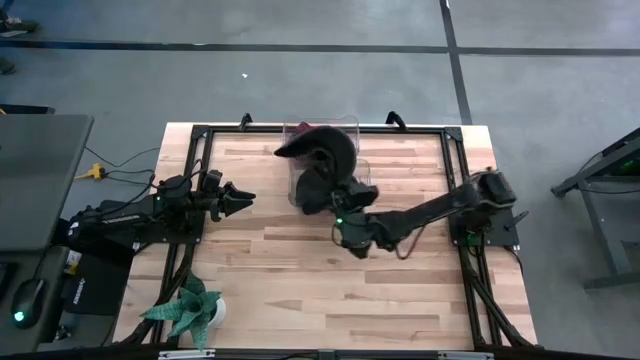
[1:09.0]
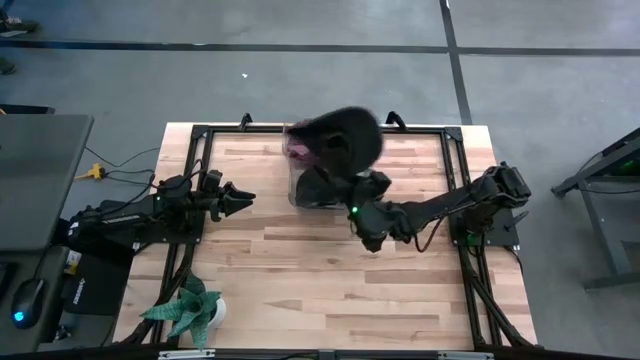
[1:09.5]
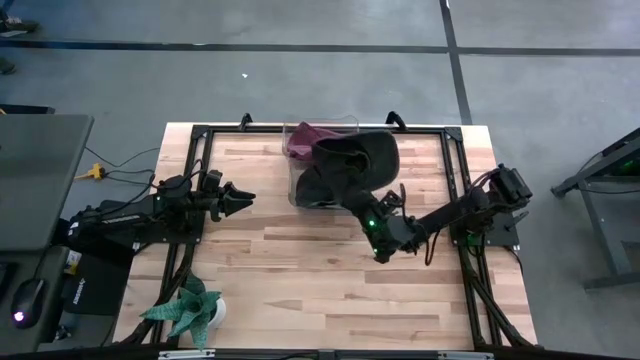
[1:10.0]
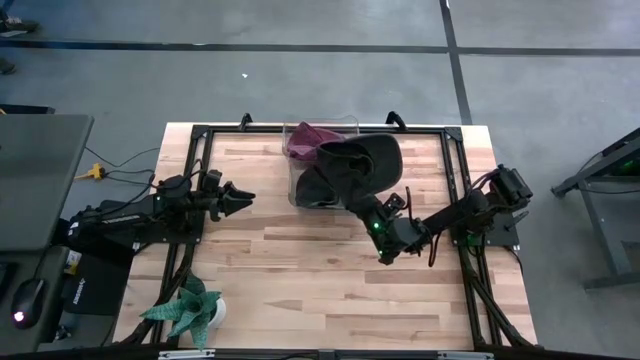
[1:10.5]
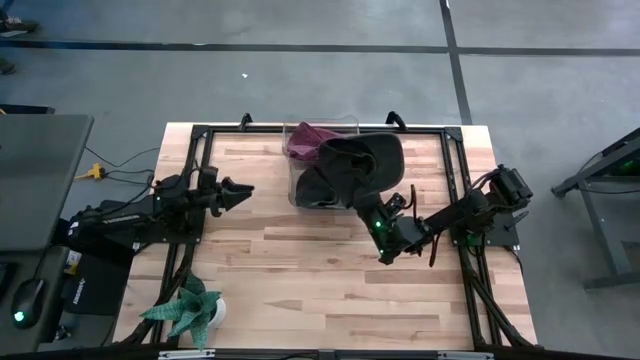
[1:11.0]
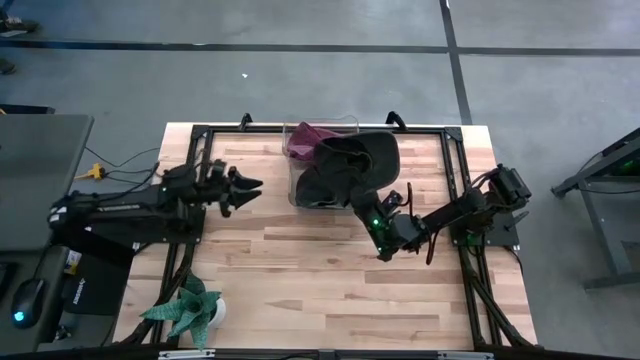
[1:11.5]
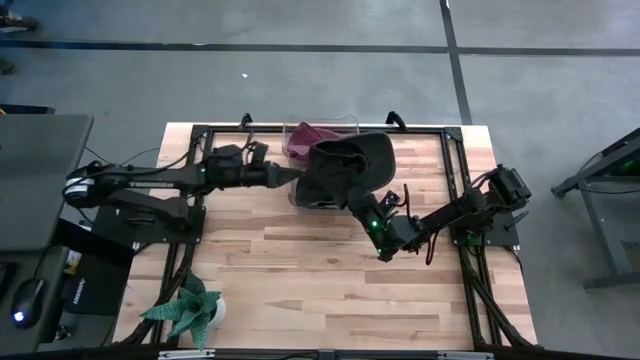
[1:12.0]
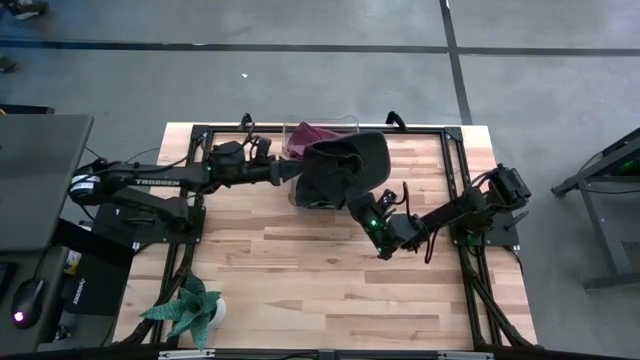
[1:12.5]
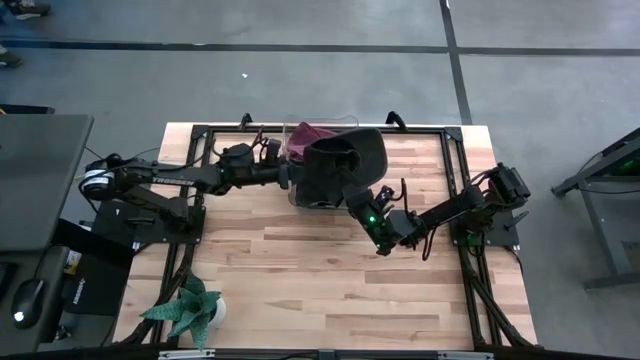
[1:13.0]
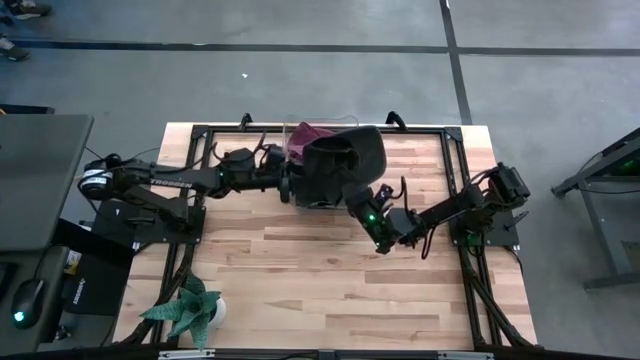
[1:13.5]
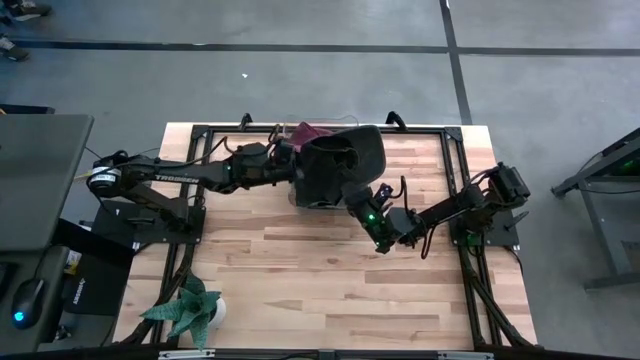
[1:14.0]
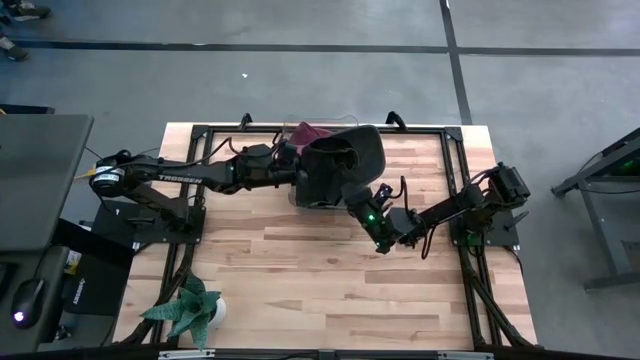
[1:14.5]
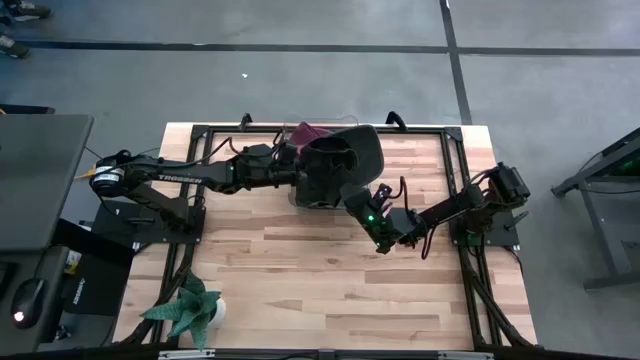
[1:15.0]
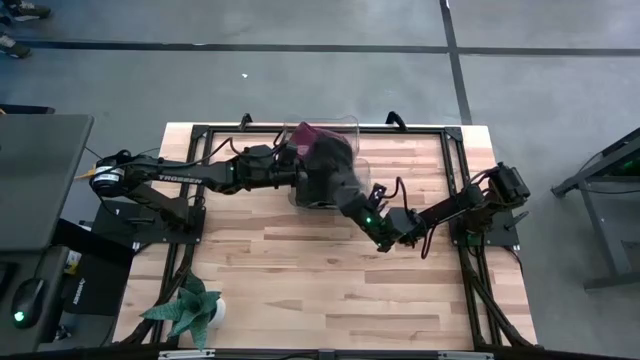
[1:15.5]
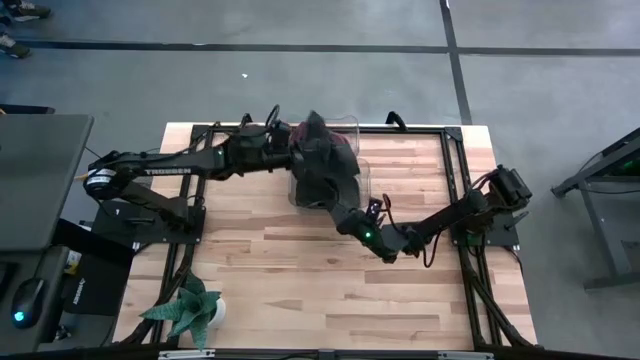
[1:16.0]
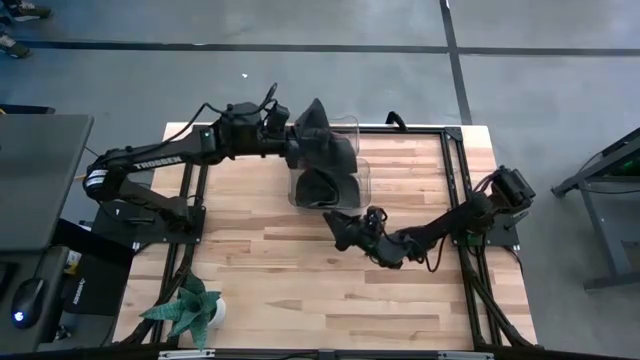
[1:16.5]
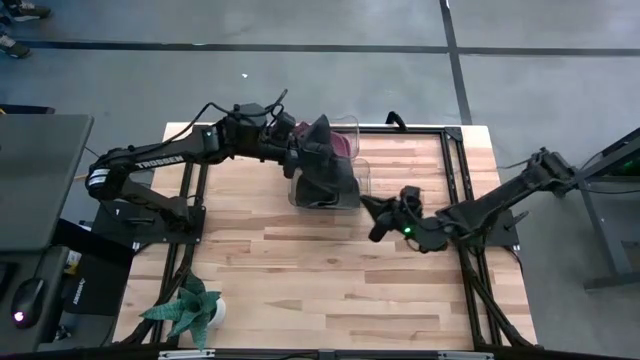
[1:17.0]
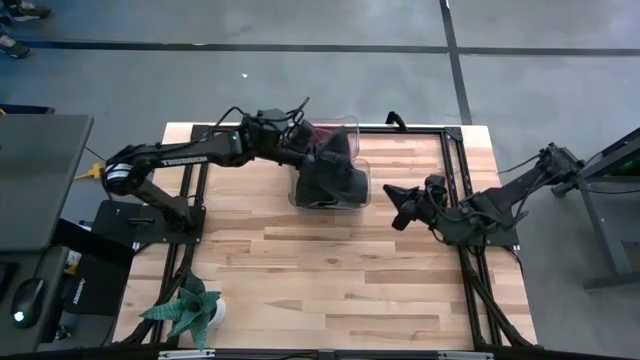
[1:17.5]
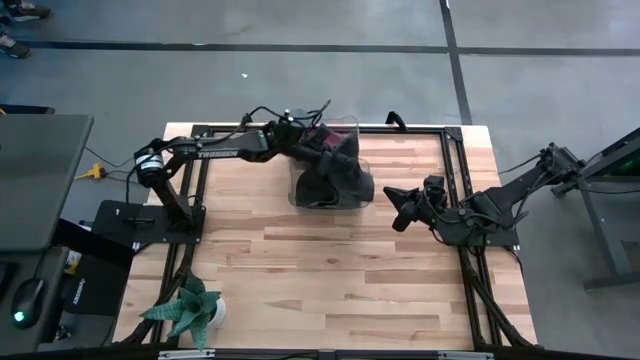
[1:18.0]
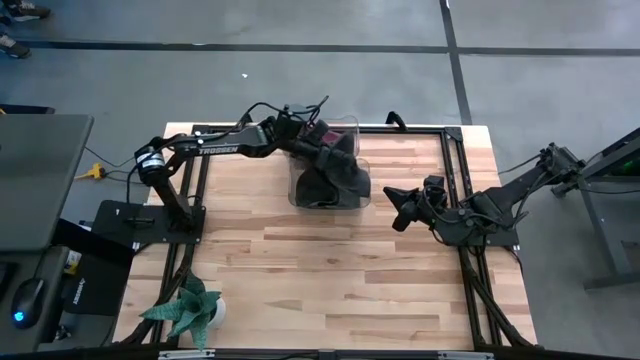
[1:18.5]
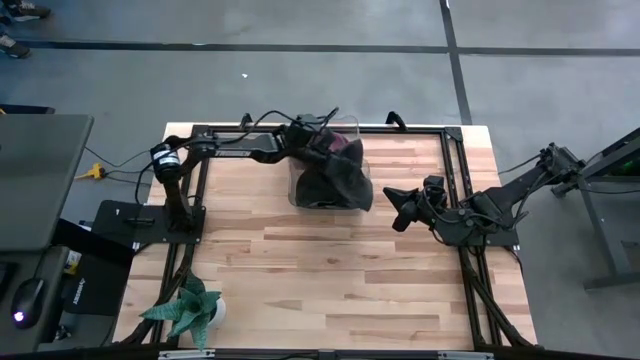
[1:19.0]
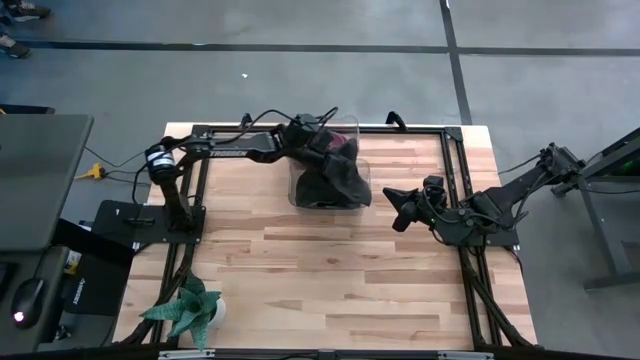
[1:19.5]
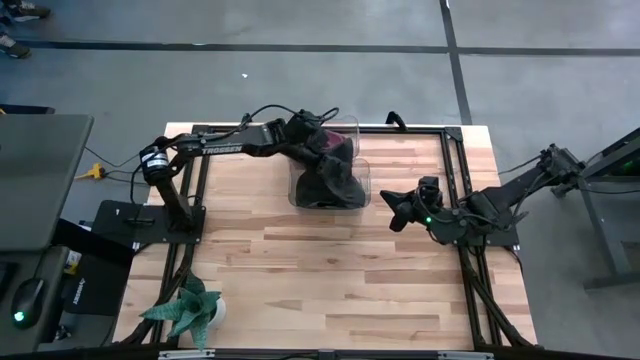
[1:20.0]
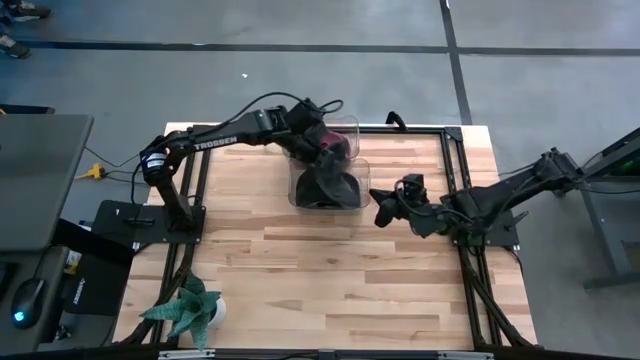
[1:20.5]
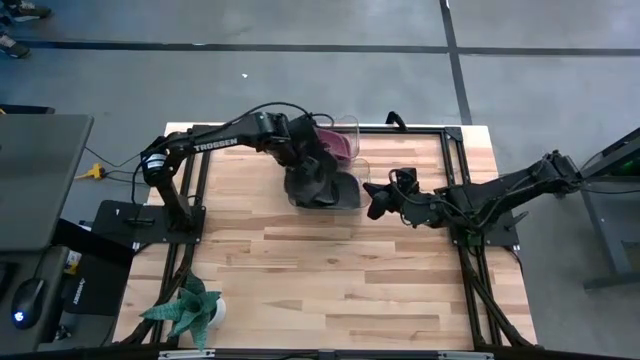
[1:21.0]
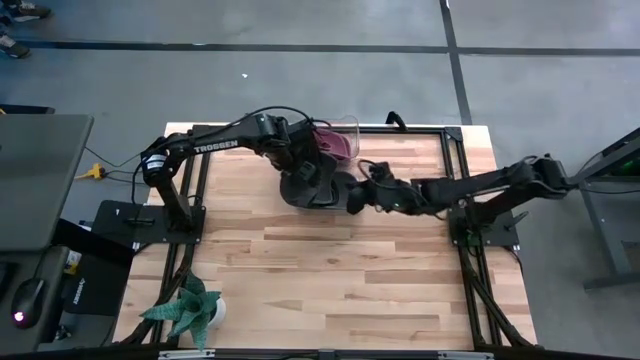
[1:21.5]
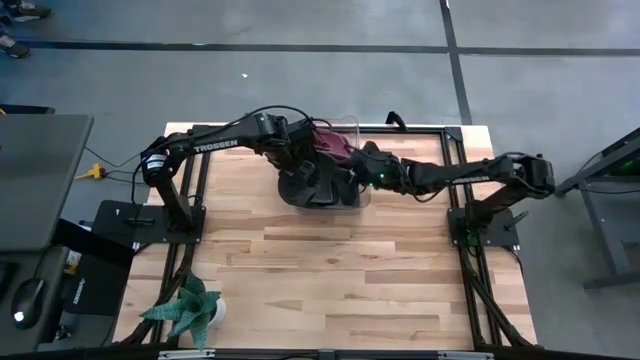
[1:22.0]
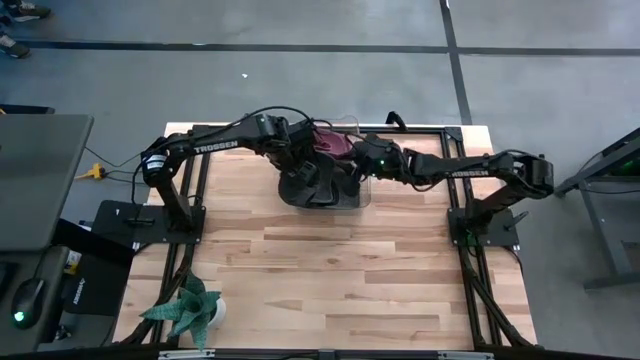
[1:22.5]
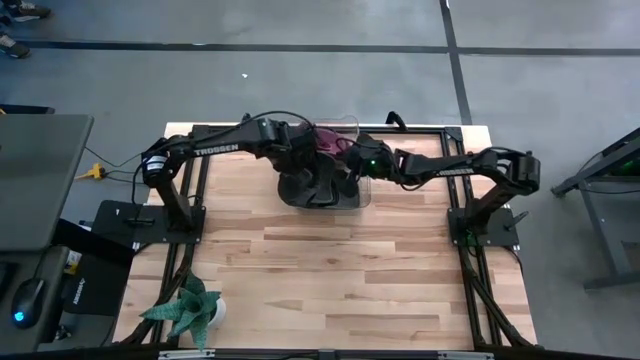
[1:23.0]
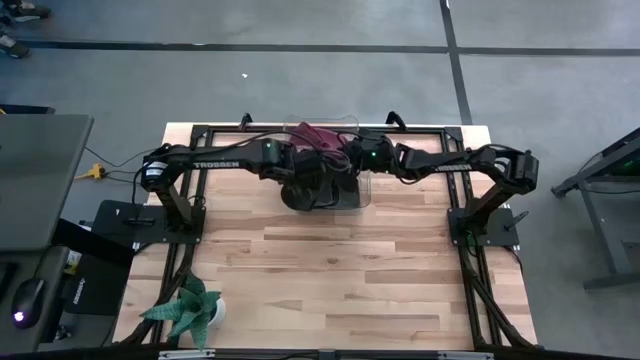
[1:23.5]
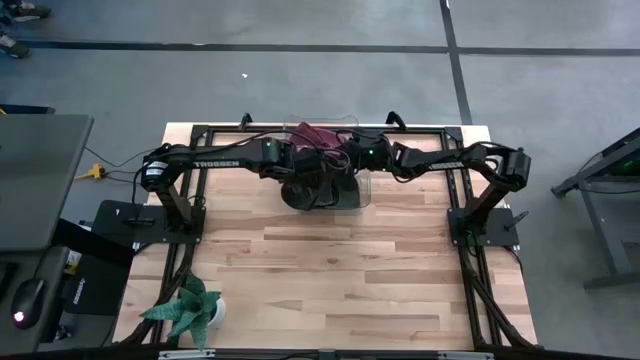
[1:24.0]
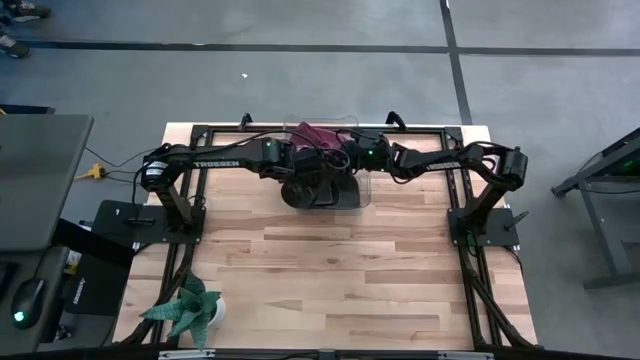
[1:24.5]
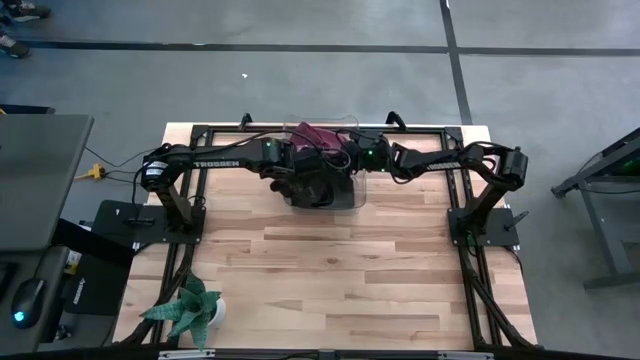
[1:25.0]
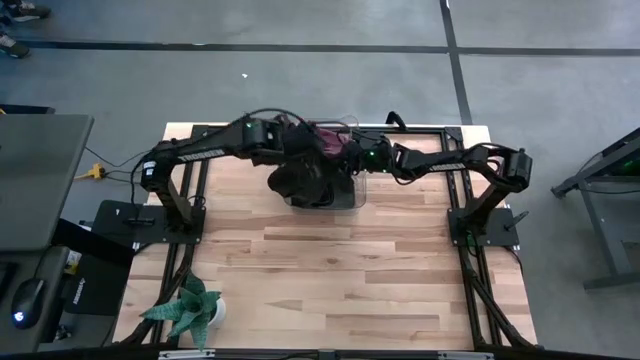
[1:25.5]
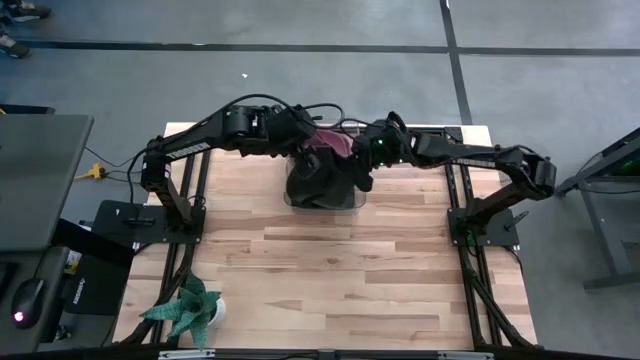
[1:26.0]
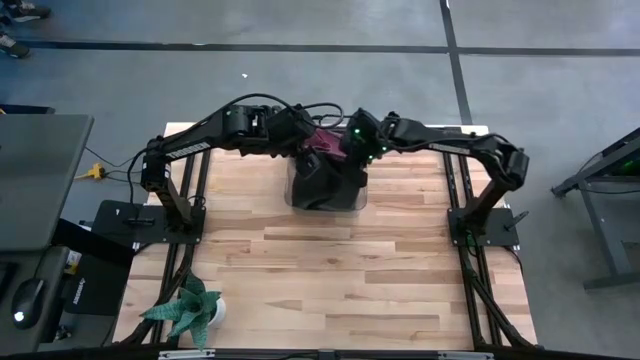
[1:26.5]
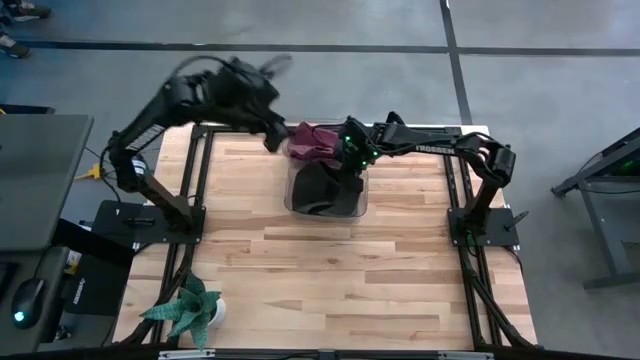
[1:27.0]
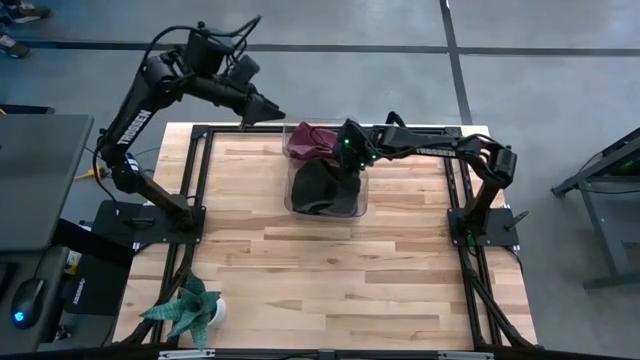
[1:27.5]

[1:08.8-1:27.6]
Task: Pick & Place hat
Put the black cap into the bottom transparent bin

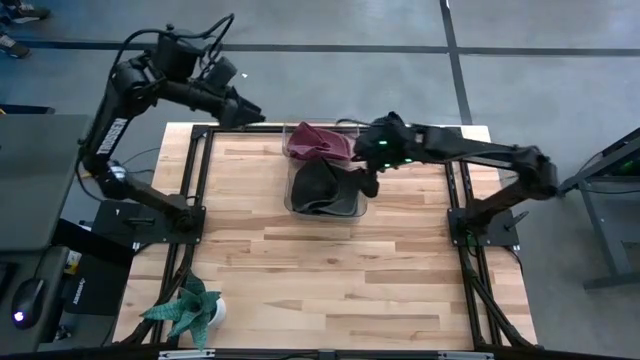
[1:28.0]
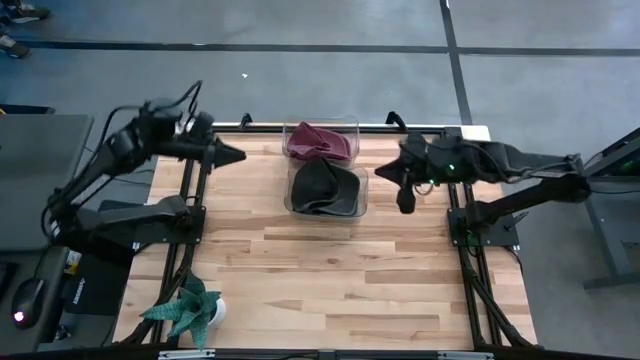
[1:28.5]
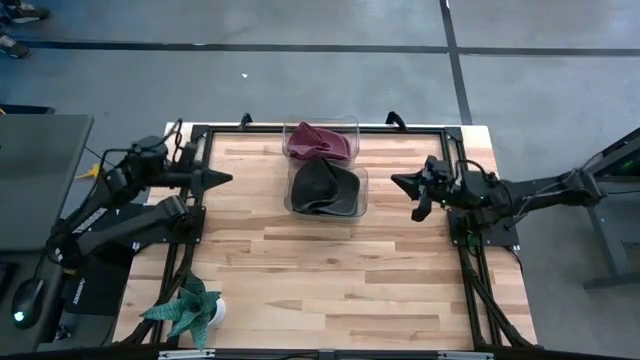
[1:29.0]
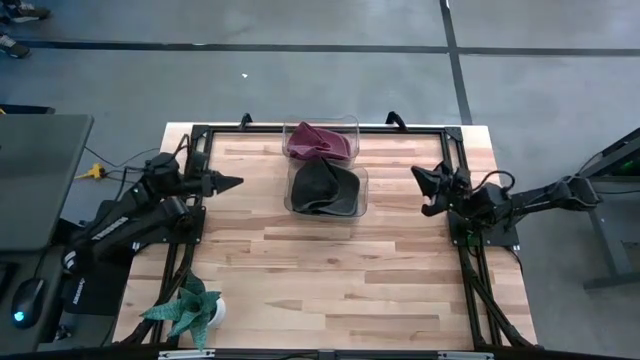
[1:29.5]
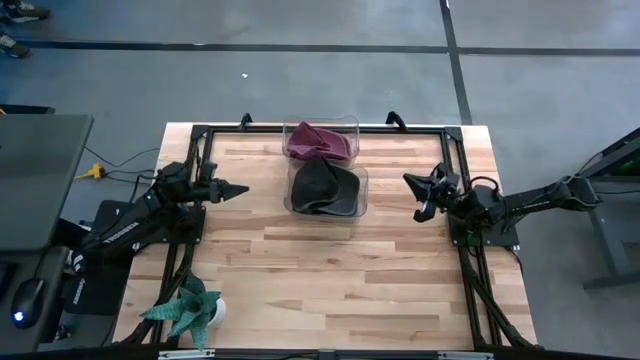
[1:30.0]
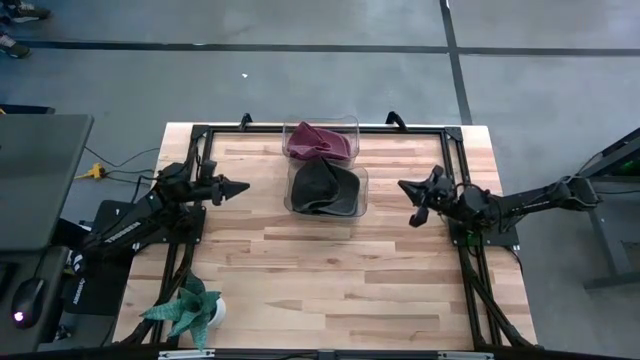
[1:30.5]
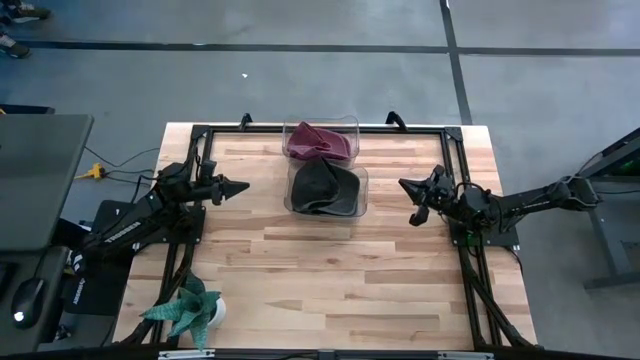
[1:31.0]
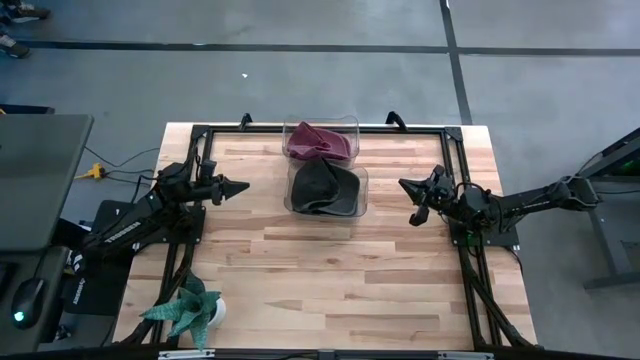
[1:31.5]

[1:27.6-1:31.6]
Return to Home Position
